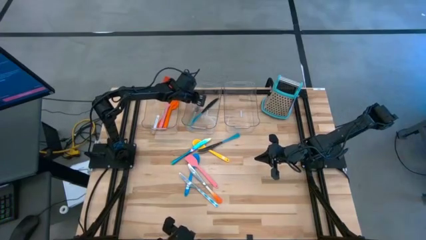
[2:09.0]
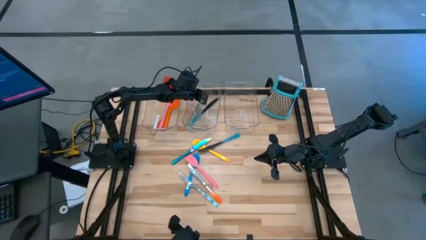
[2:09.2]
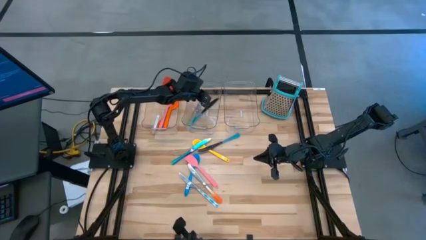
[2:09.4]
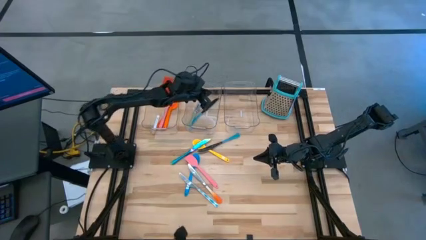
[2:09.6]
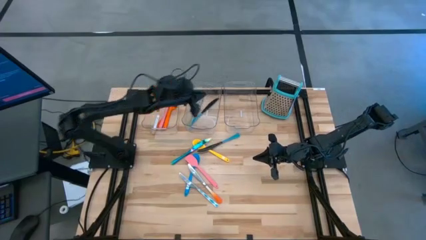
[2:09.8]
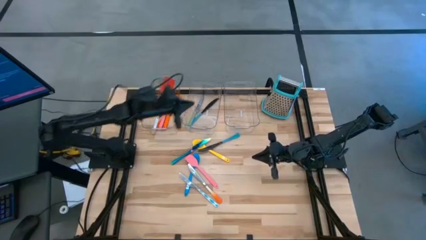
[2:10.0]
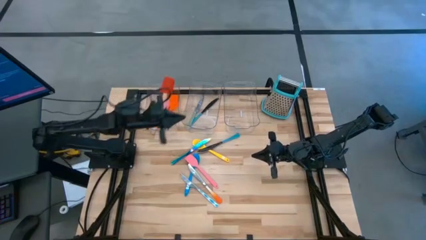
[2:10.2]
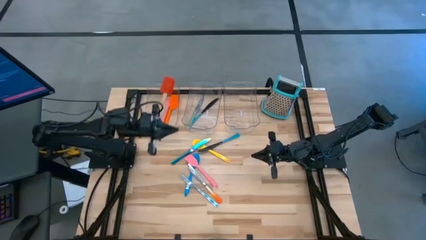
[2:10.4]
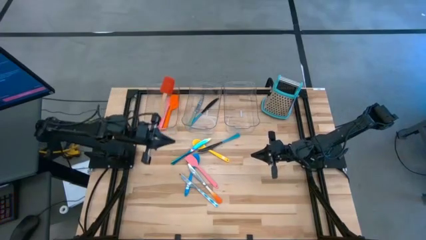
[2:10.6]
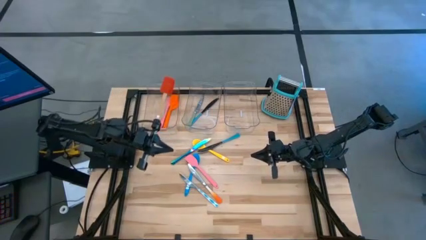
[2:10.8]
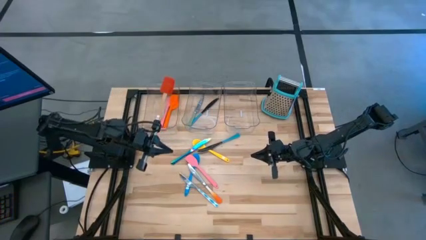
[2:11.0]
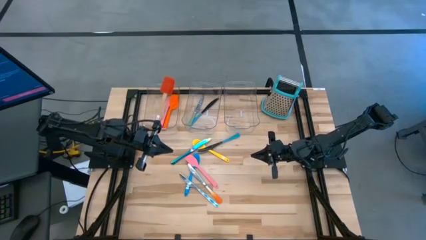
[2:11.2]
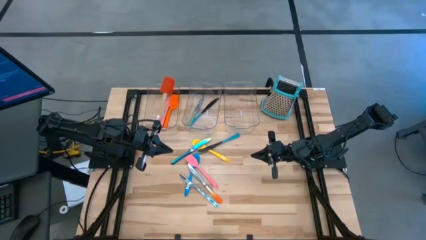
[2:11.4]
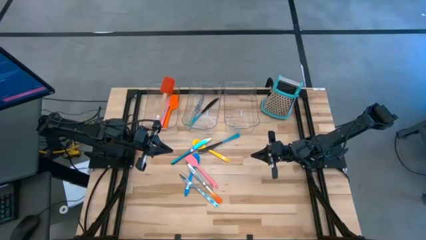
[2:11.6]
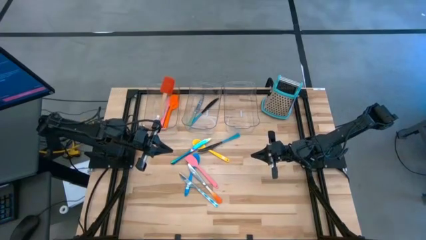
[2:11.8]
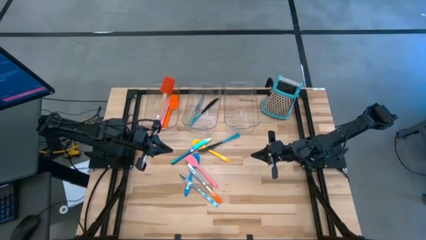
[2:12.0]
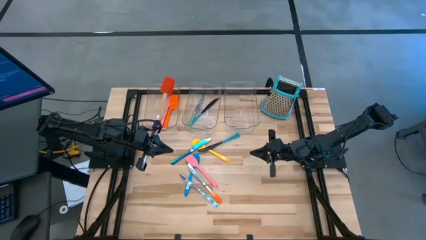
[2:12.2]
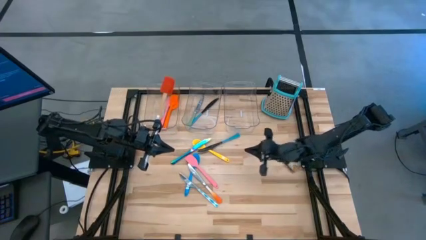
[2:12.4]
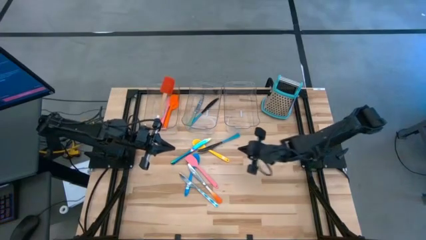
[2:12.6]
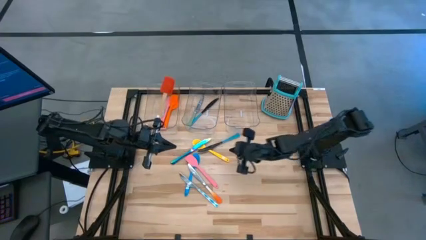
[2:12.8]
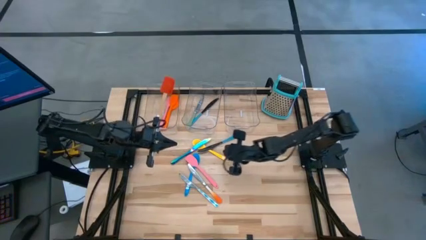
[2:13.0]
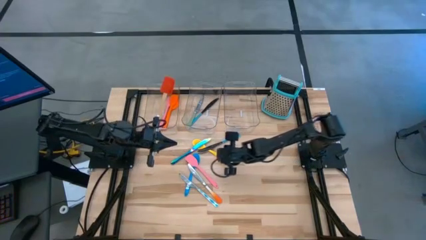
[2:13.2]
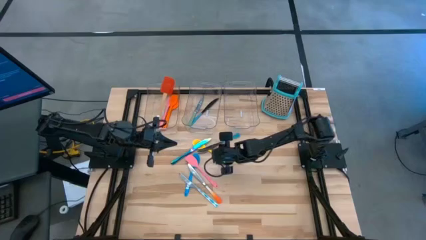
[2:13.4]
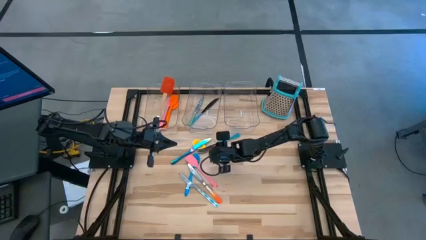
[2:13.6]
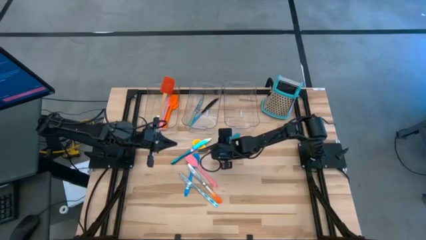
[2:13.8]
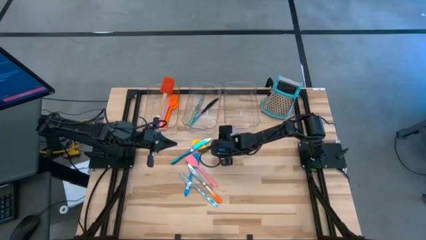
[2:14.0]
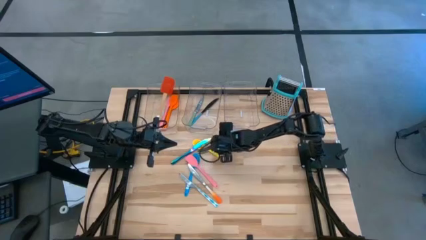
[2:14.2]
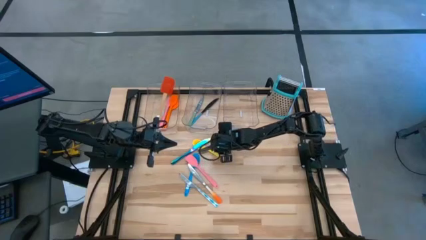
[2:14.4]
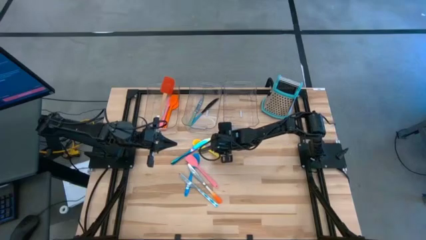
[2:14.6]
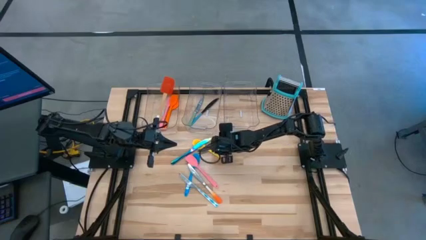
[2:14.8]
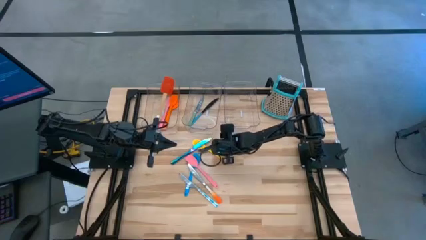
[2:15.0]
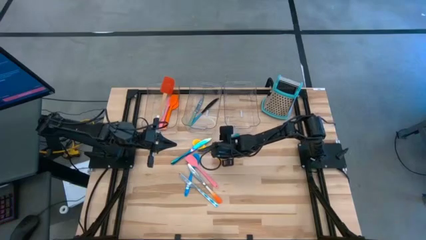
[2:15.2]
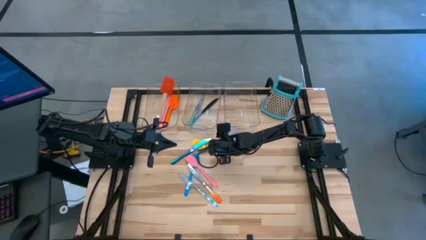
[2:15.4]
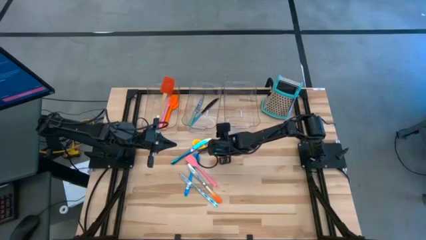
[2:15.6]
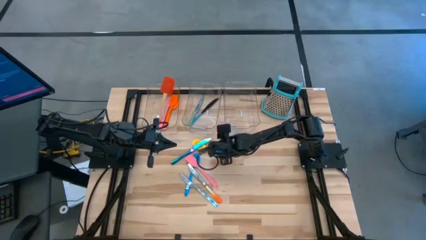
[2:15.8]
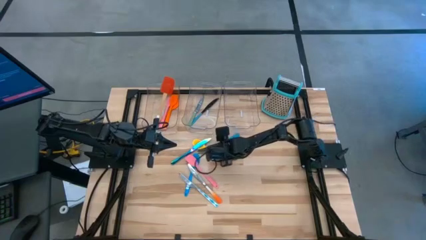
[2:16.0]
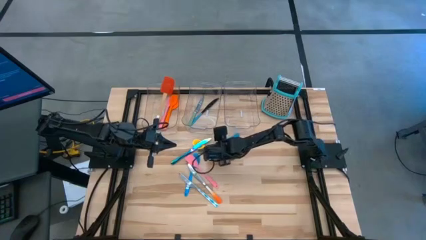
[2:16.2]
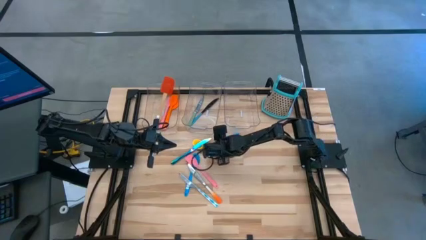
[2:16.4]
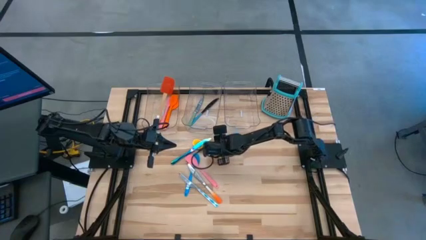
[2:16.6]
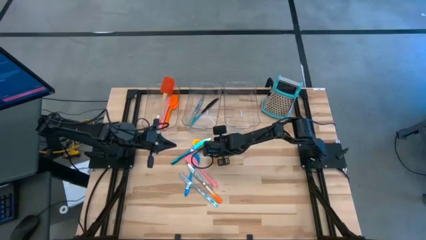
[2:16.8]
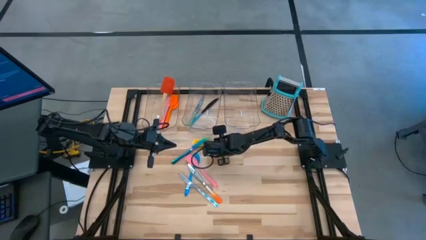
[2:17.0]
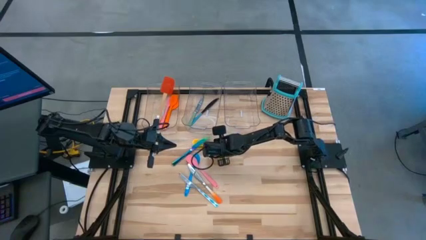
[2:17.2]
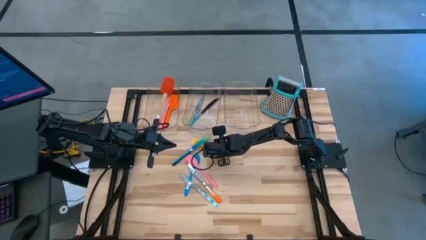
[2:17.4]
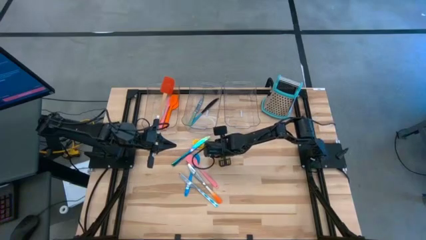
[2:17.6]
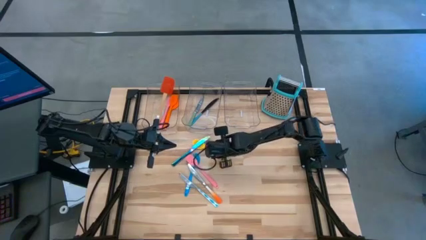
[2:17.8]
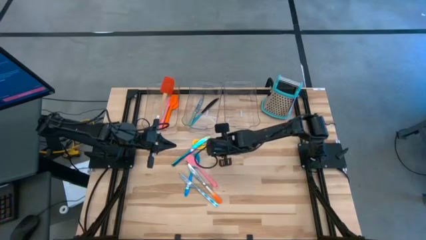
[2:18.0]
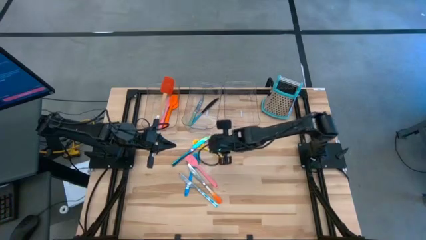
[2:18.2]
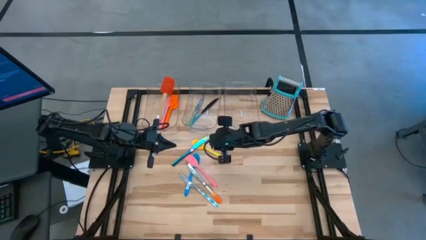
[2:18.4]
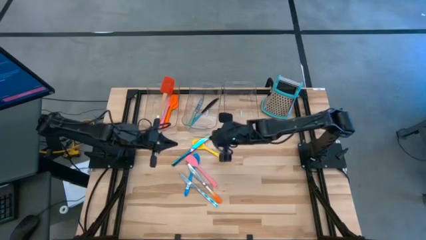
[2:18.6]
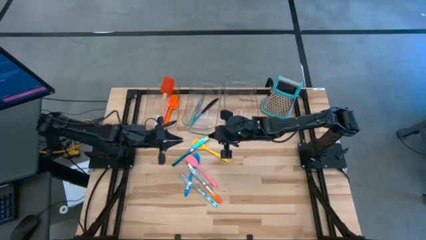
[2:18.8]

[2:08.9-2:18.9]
Task: Pick & Place Kitchen Items
Put the blue knife into the middle transparent bin

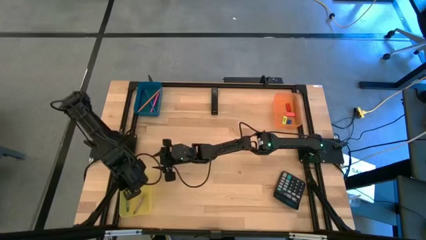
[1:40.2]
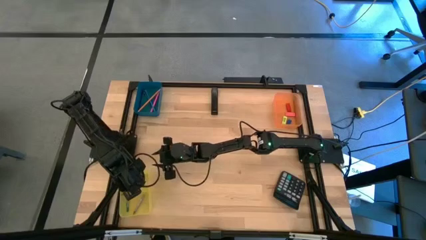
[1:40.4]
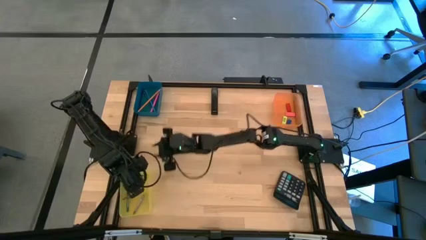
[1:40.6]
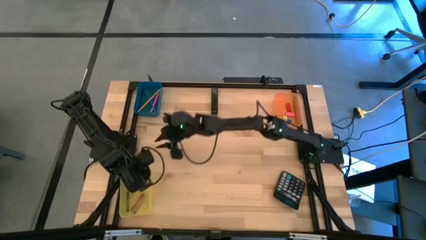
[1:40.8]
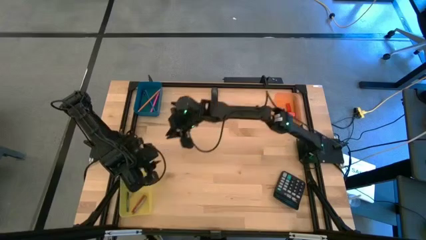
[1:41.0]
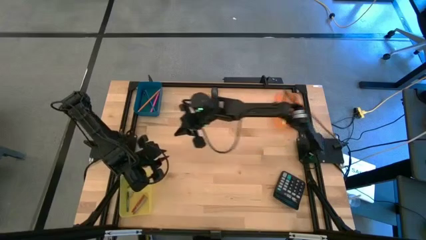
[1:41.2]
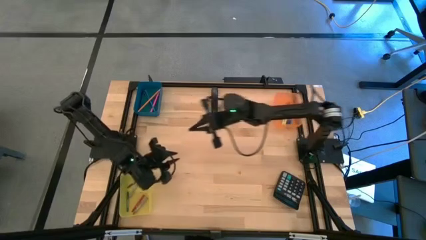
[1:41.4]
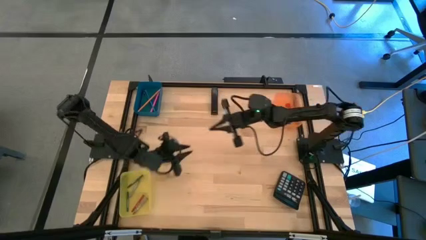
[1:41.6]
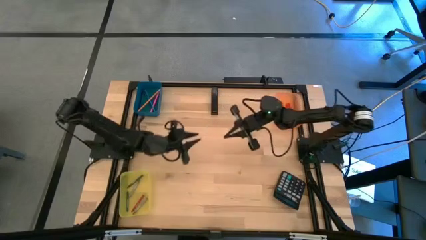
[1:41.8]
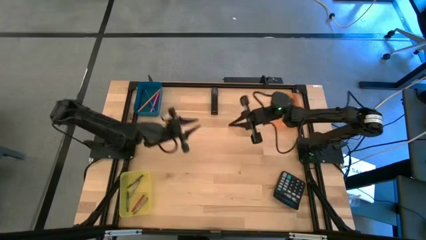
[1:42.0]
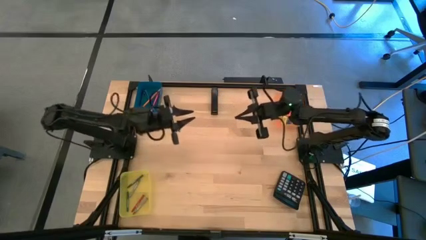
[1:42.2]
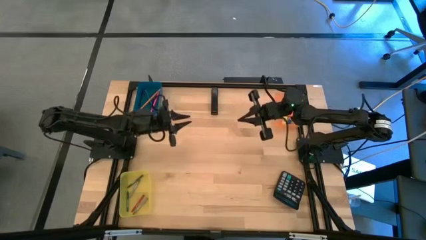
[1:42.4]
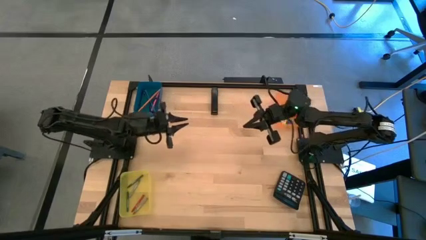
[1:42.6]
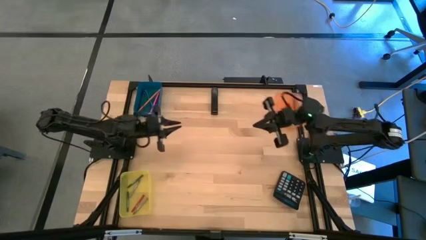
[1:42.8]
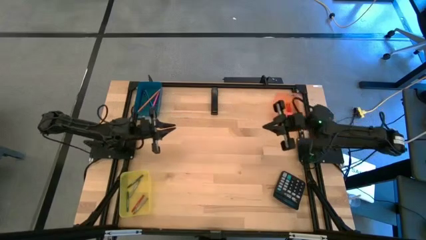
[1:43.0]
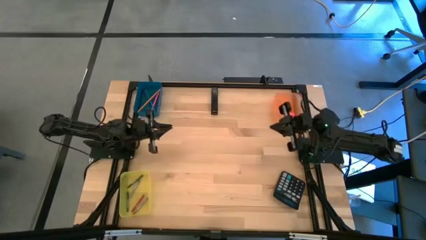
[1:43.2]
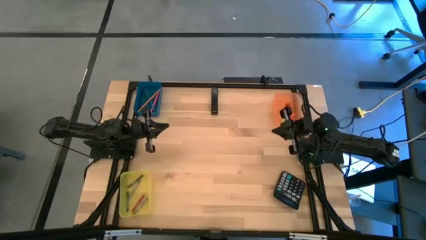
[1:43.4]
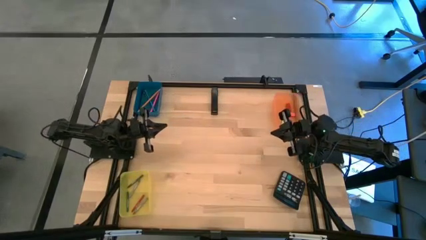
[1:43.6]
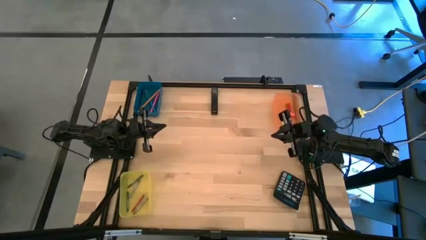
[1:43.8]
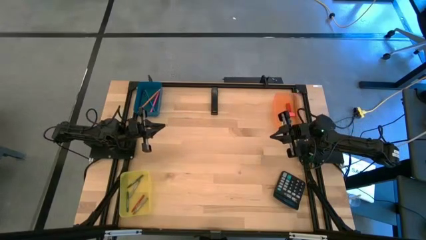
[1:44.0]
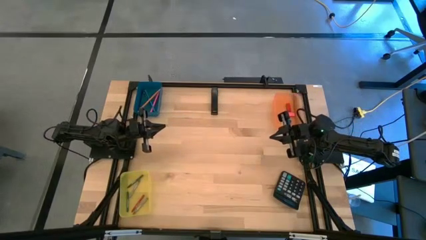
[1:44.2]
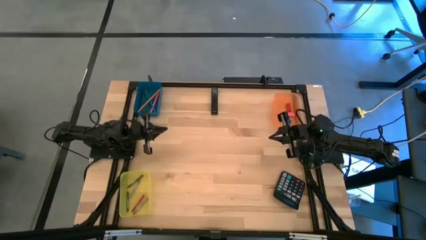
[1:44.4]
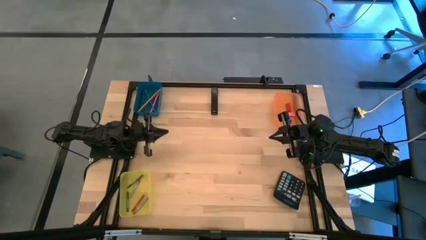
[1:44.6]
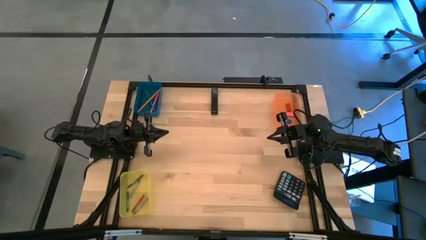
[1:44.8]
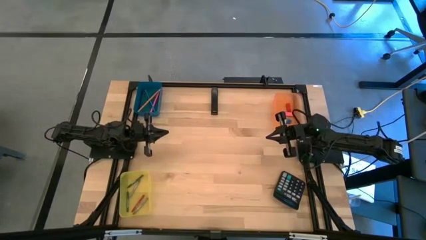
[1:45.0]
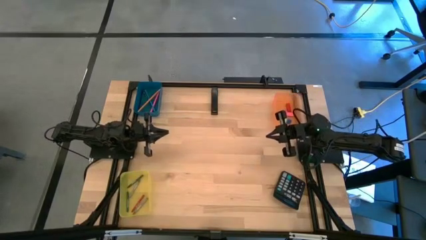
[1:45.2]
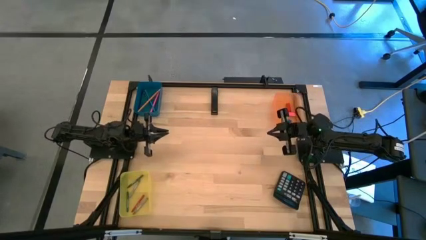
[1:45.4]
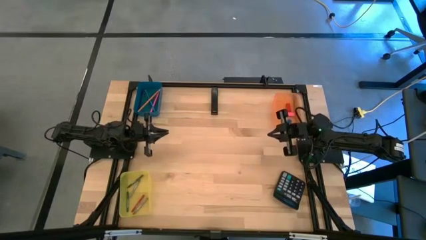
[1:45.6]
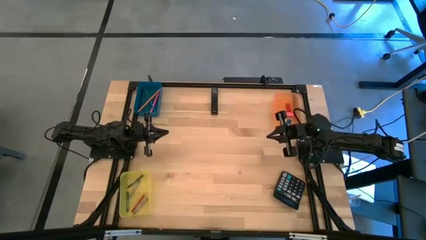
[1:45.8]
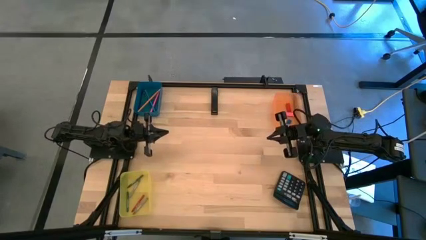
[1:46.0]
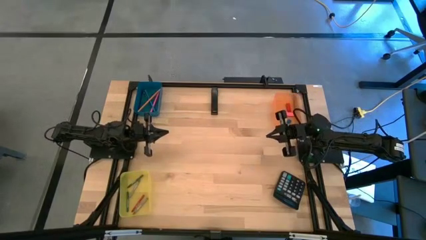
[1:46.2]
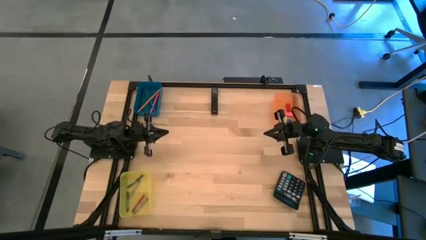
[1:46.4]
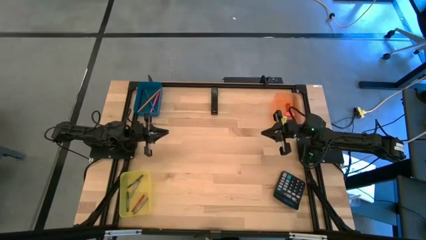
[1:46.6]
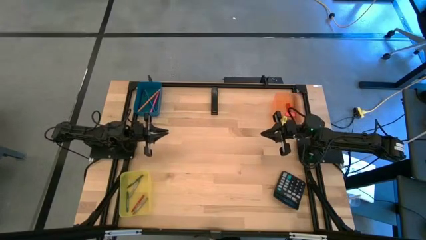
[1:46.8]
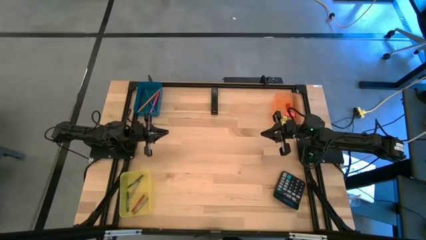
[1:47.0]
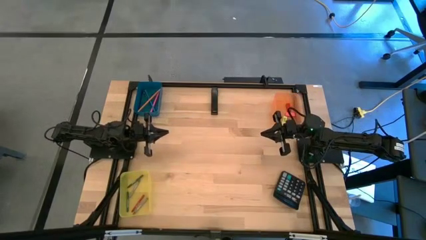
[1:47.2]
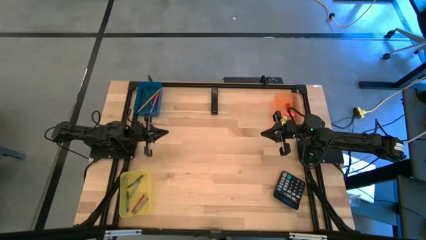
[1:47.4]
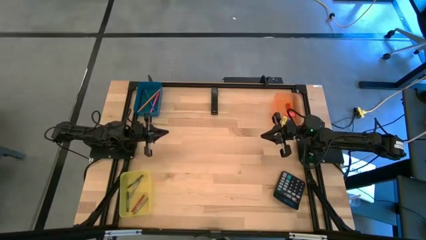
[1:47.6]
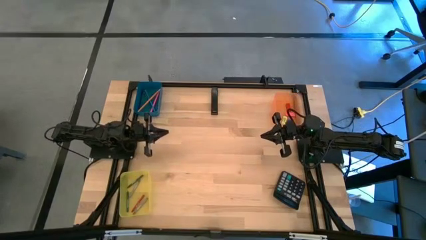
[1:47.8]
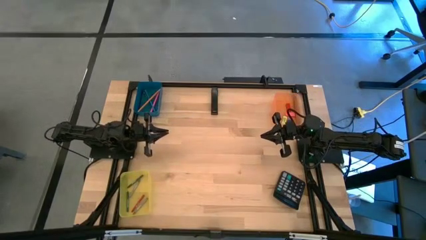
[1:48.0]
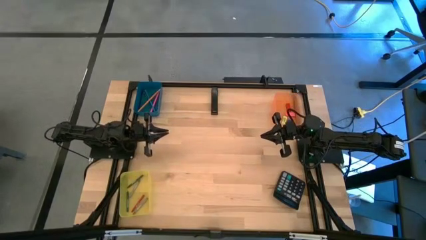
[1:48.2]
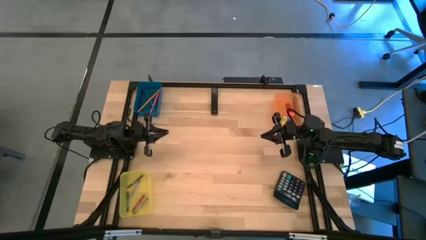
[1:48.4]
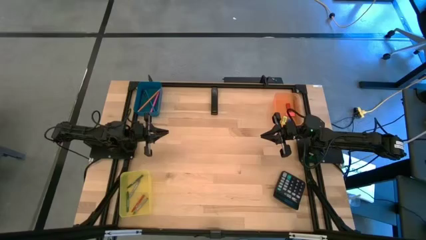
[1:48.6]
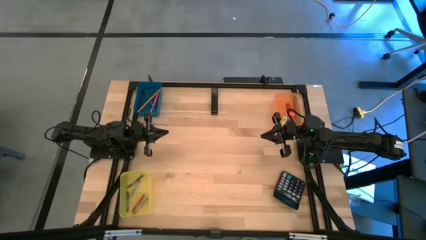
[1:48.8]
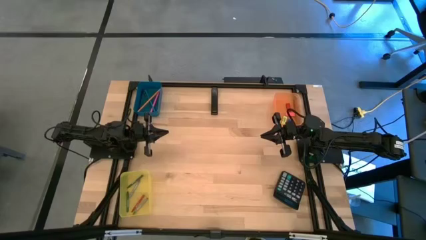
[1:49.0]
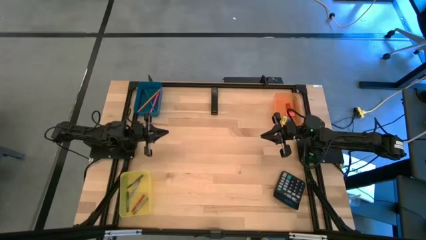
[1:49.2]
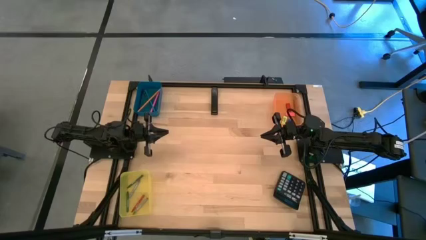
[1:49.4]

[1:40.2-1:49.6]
Task: Sort crayons/erasers/pens/pencils in bins
Return to Home Position
